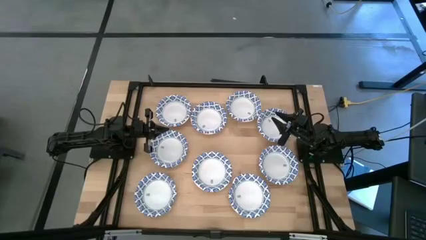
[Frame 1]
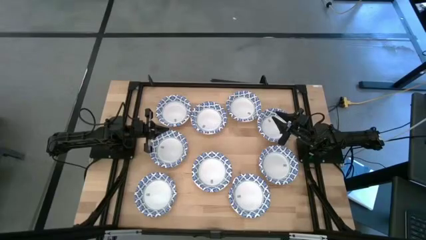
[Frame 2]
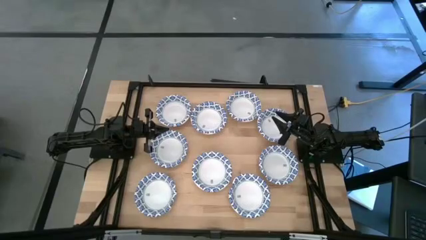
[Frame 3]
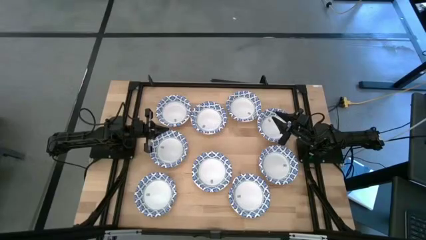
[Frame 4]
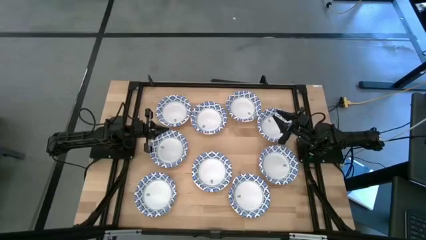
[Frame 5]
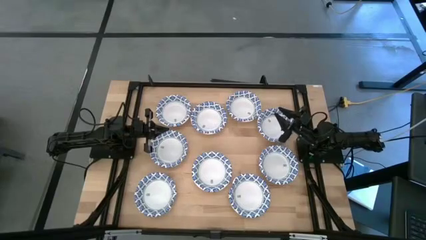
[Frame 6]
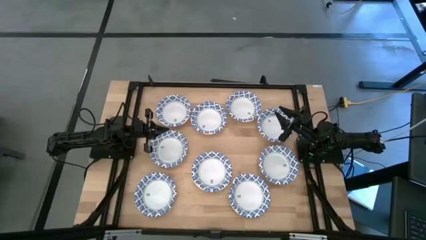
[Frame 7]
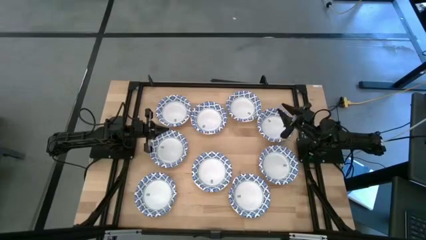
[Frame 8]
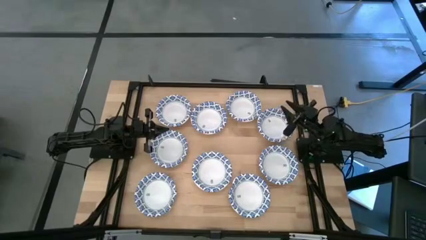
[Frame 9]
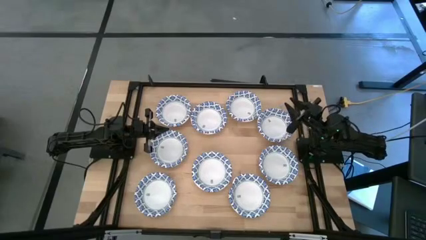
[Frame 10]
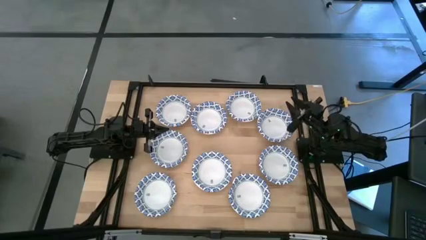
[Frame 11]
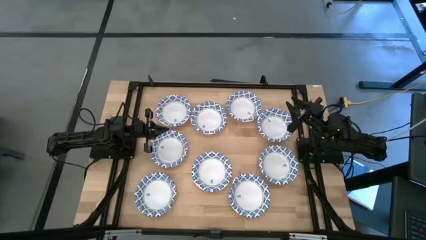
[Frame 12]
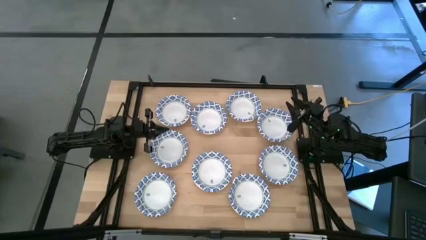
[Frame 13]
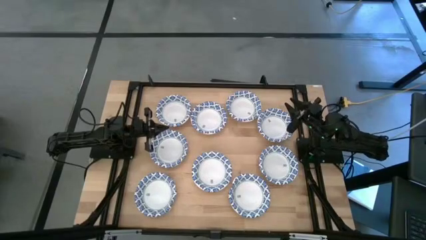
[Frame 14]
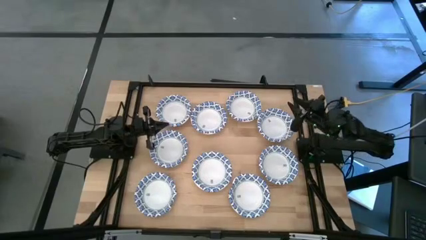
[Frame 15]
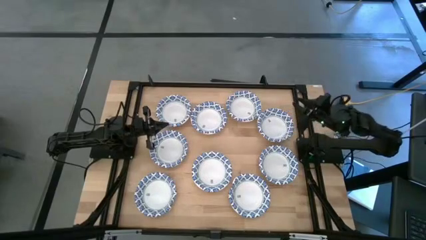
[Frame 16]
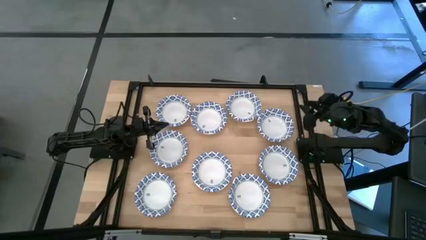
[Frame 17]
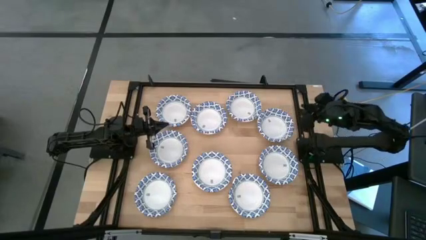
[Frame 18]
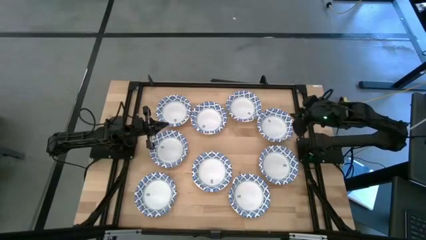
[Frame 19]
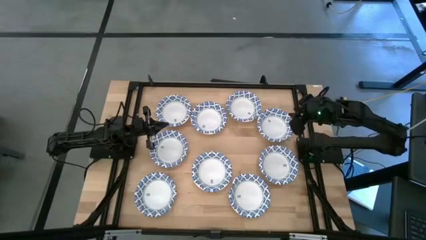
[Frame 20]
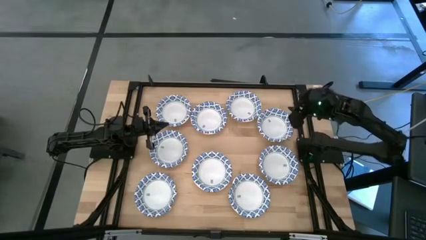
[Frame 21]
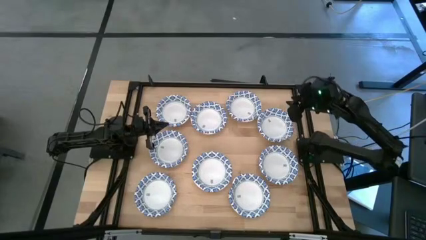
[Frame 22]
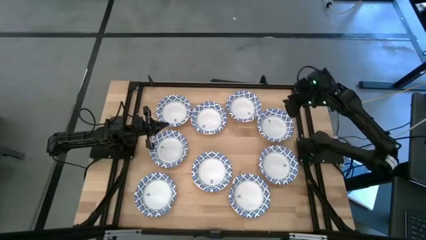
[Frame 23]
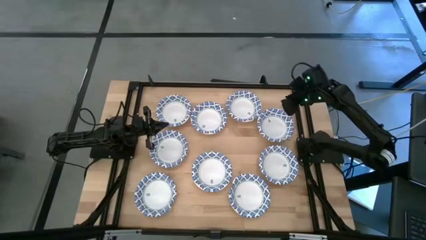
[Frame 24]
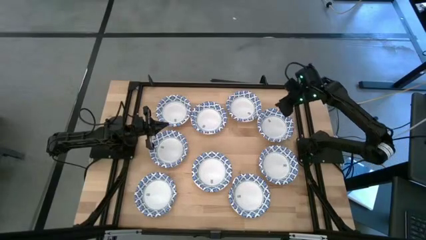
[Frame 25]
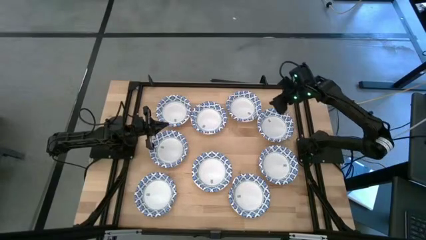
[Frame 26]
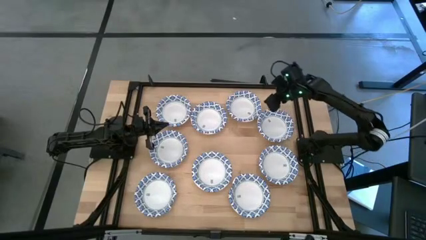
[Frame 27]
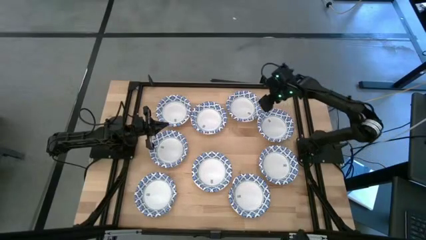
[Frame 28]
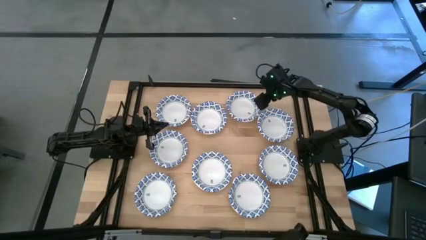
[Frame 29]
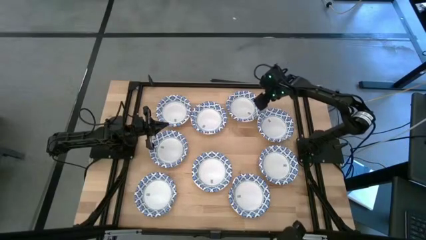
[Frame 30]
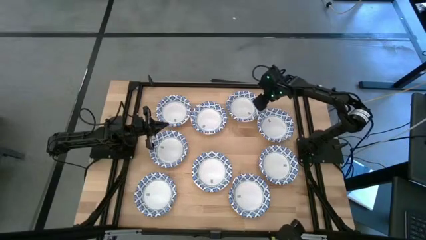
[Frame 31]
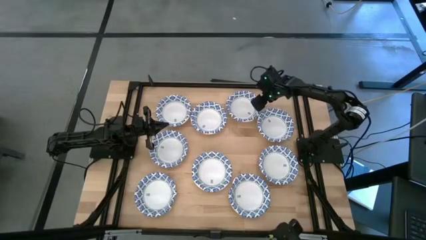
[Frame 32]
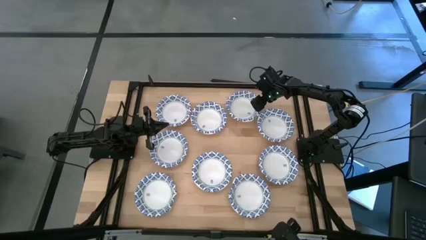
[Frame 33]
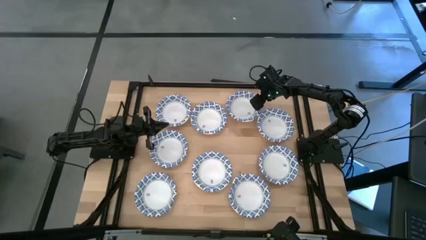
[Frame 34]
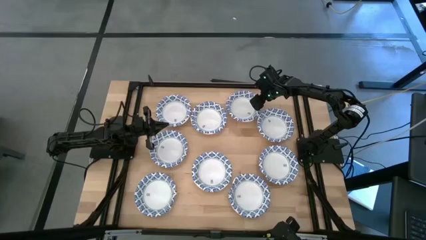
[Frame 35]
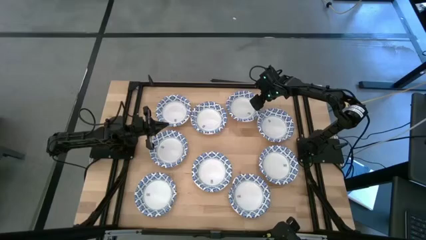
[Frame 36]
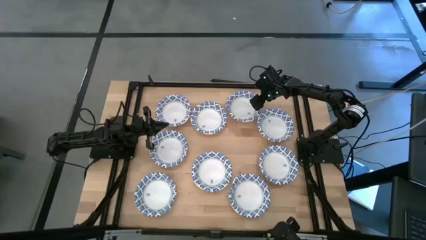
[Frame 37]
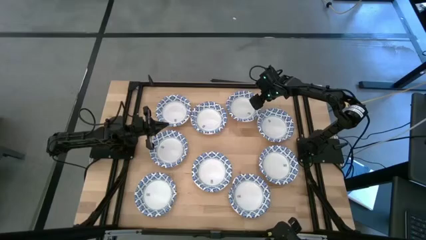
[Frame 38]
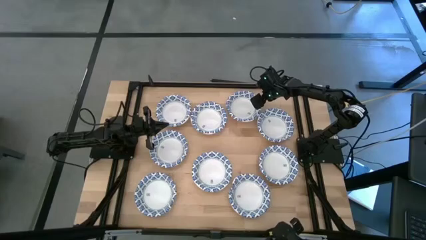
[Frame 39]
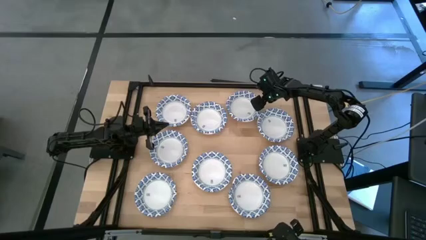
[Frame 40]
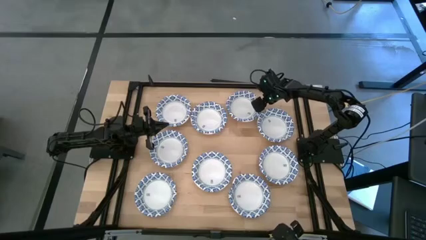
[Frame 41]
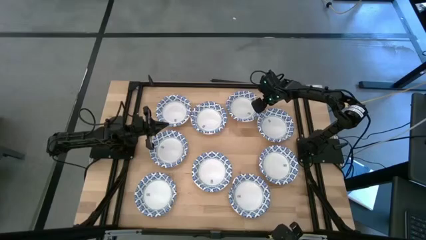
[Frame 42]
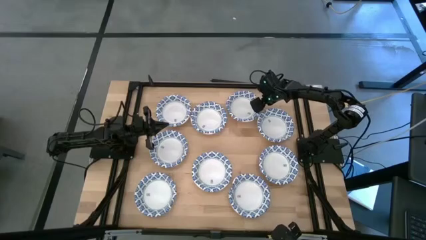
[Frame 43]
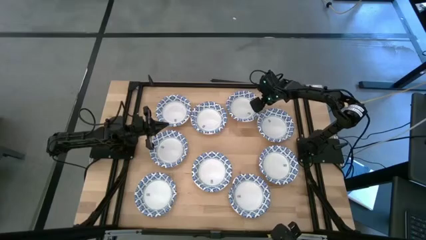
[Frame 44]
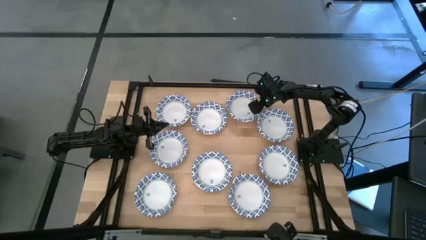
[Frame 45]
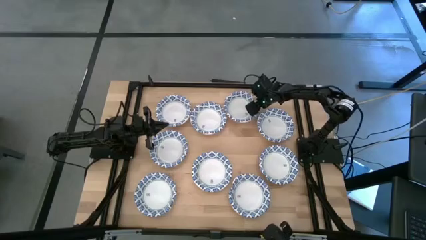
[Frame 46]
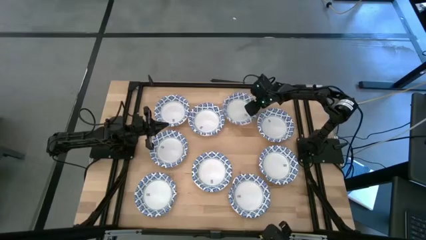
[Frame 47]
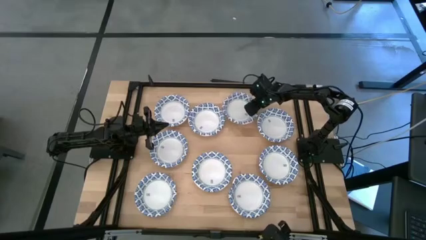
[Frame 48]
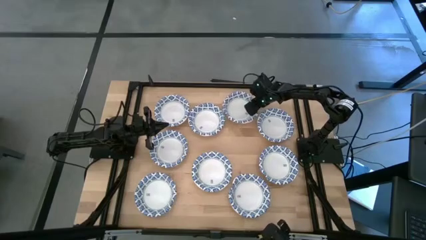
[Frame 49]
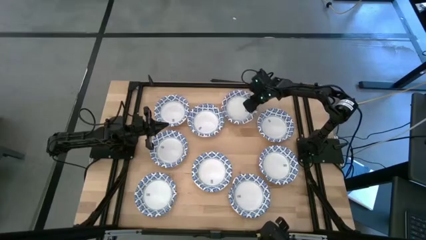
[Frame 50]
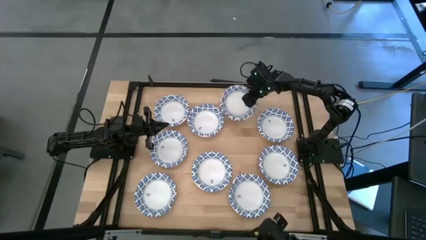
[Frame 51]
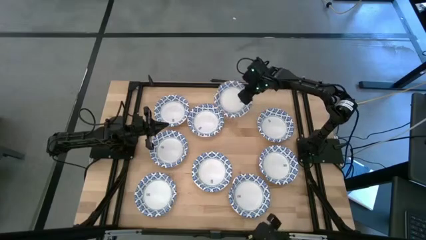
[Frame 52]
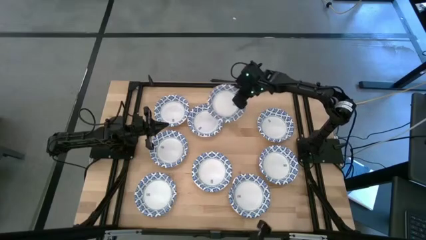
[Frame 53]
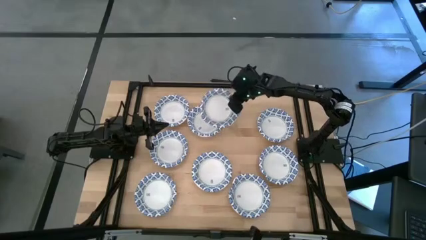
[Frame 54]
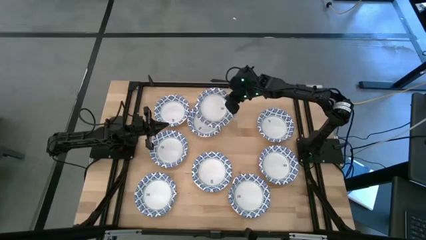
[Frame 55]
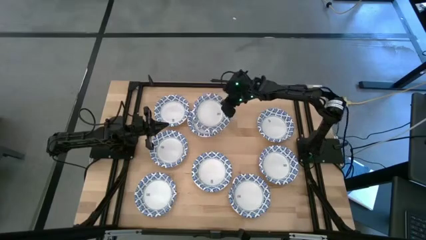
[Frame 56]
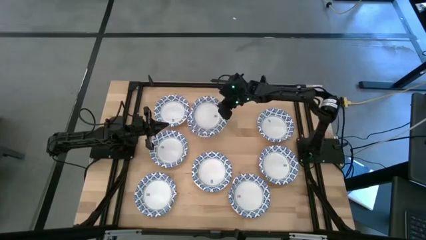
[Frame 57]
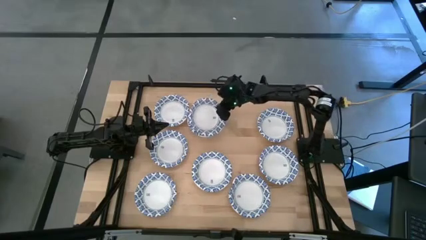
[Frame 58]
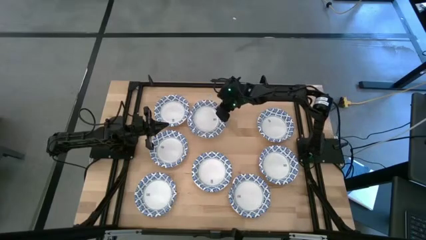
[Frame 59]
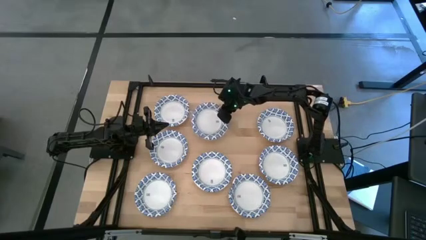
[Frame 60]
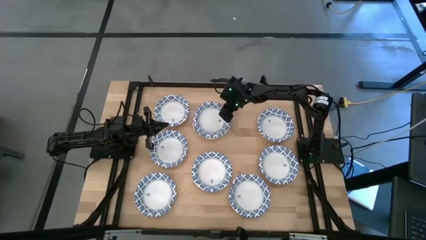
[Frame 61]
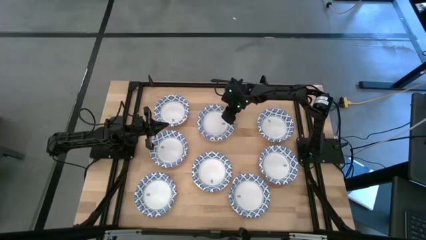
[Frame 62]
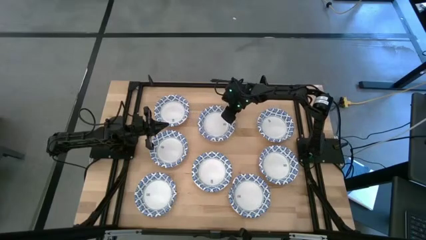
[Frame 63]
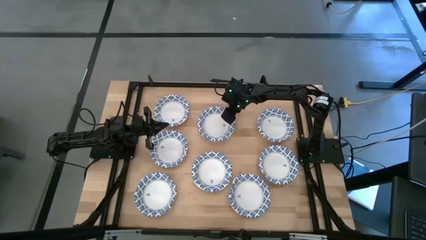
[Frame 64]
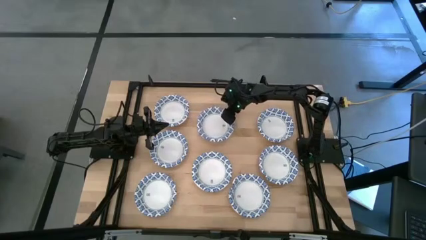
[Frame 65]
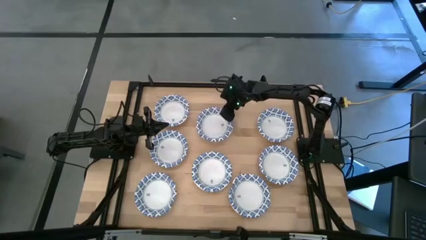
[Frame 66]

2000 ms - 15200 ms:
Task: Nest bowls inside each other
Stack the bowl on top of the bowl on the table
